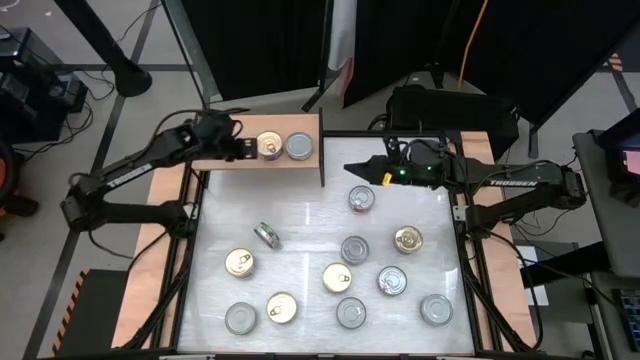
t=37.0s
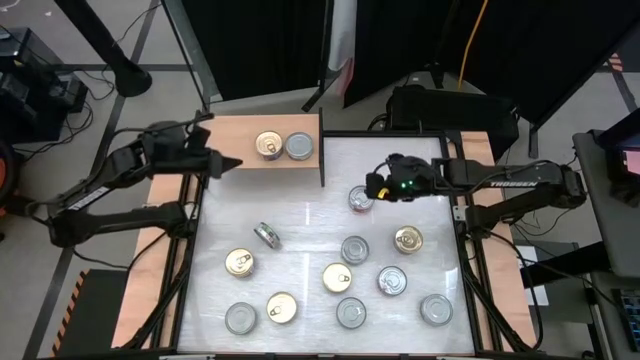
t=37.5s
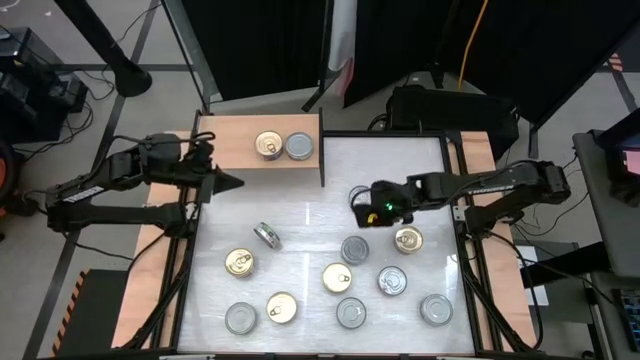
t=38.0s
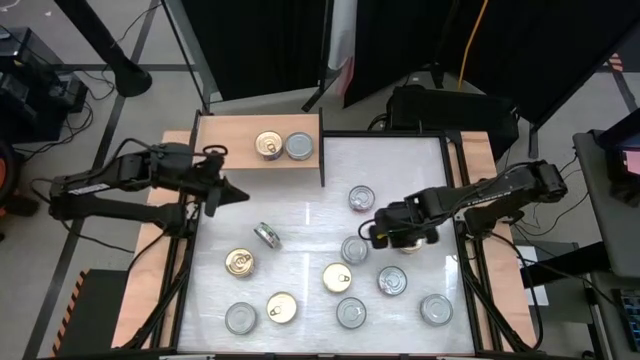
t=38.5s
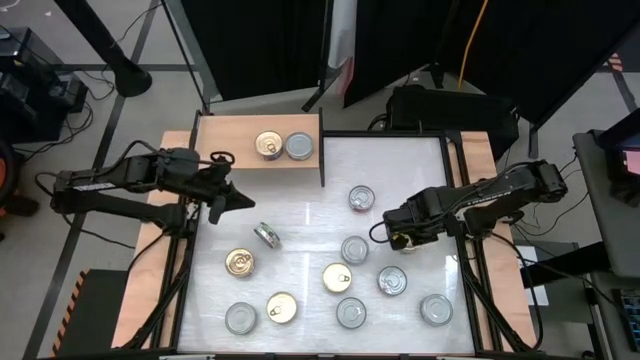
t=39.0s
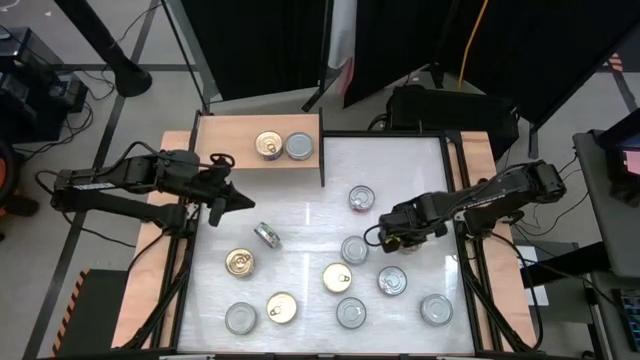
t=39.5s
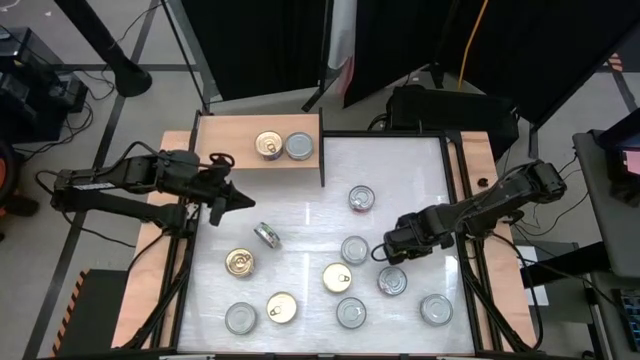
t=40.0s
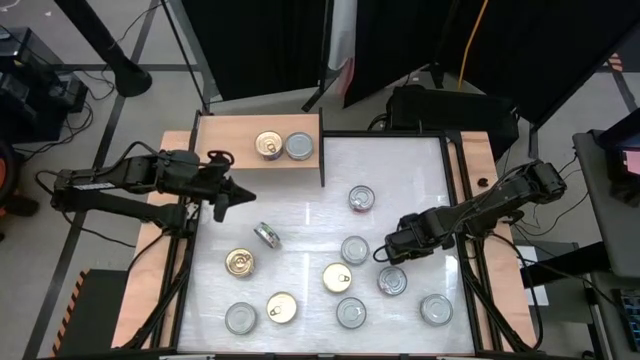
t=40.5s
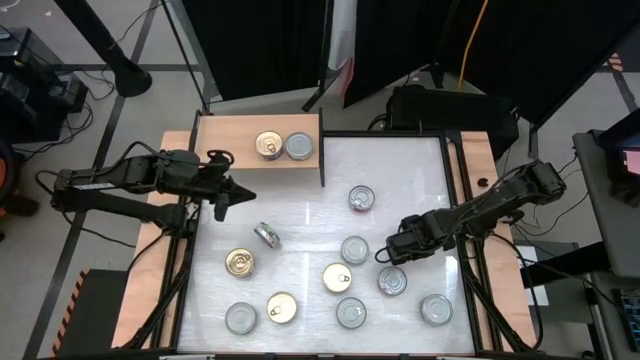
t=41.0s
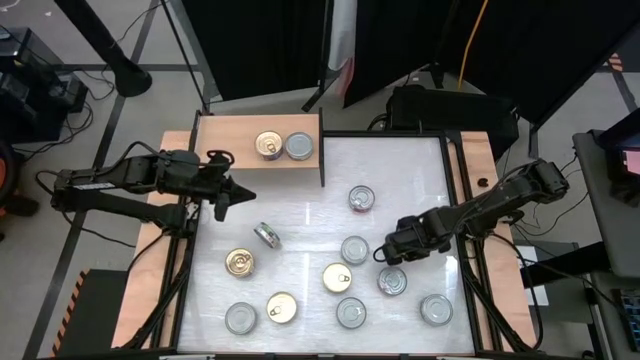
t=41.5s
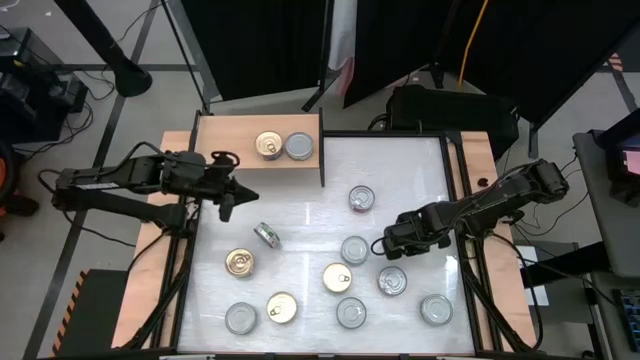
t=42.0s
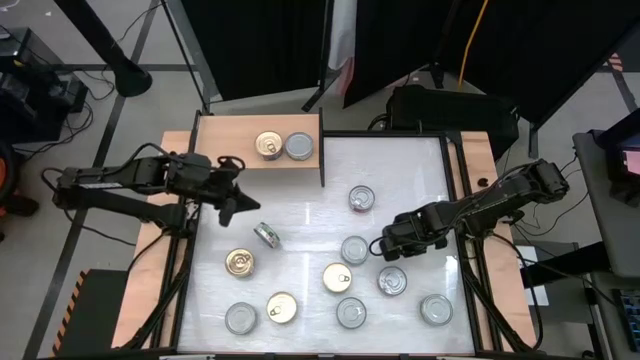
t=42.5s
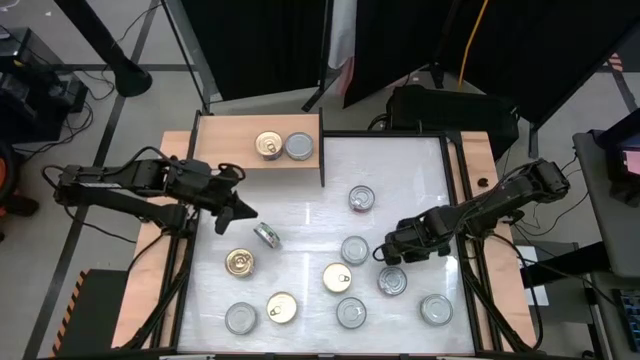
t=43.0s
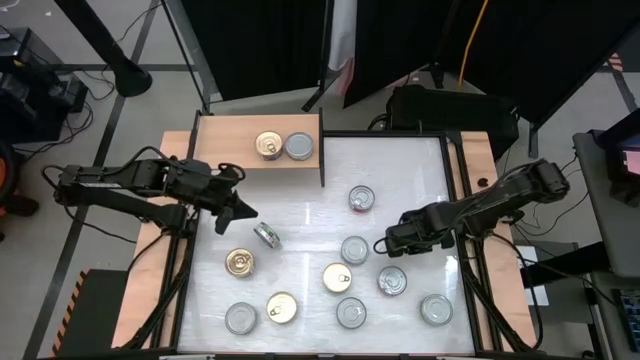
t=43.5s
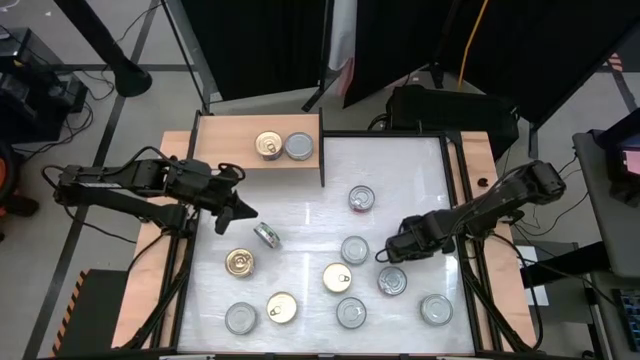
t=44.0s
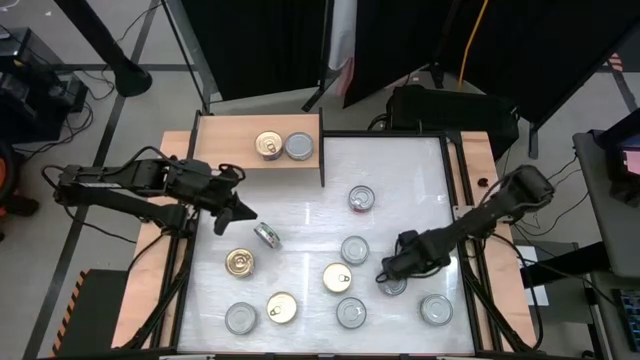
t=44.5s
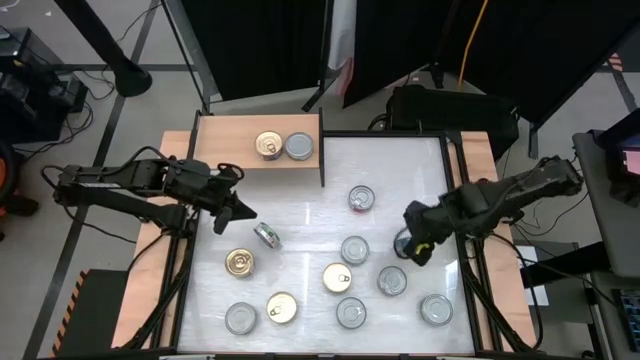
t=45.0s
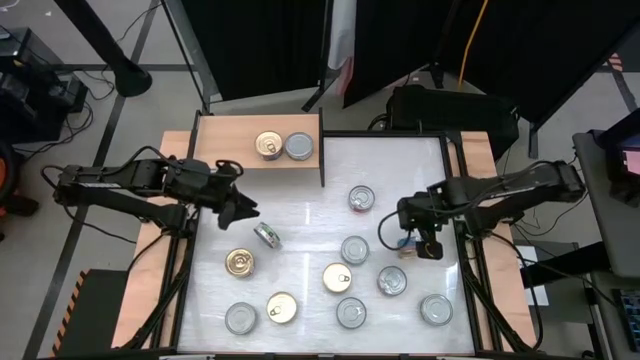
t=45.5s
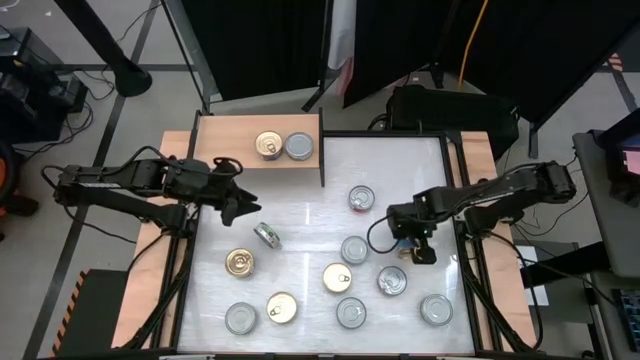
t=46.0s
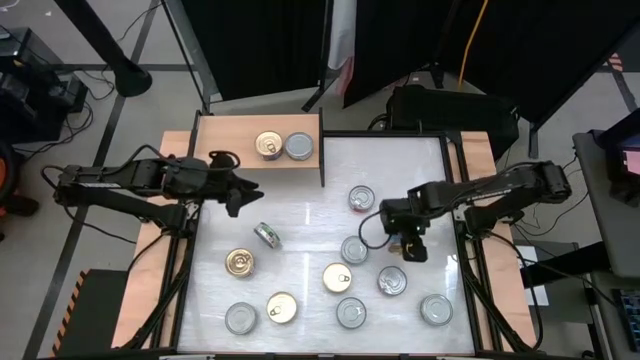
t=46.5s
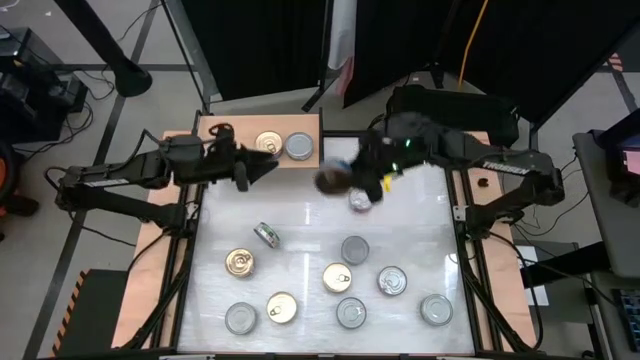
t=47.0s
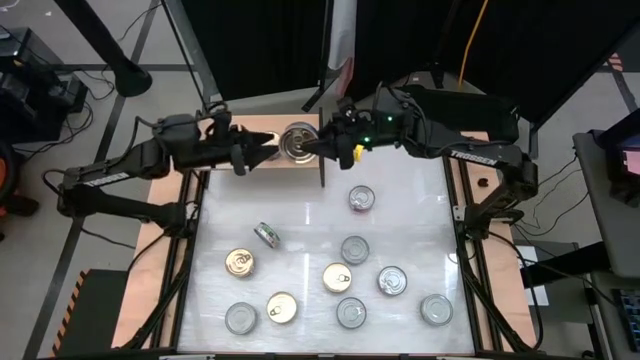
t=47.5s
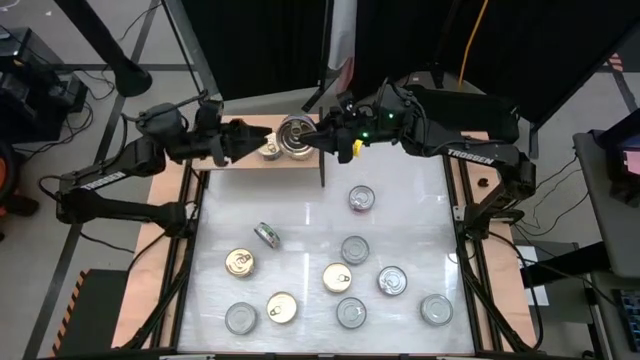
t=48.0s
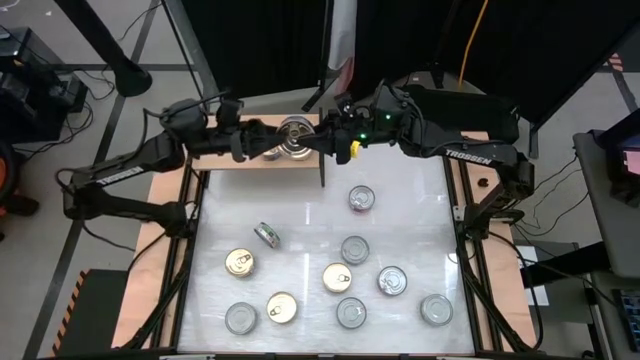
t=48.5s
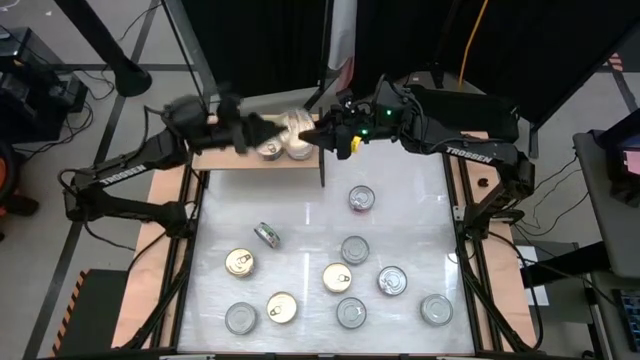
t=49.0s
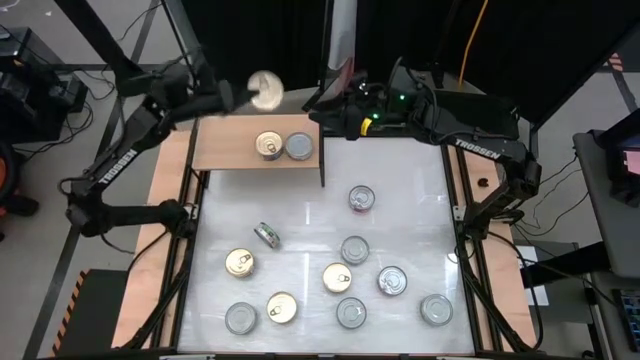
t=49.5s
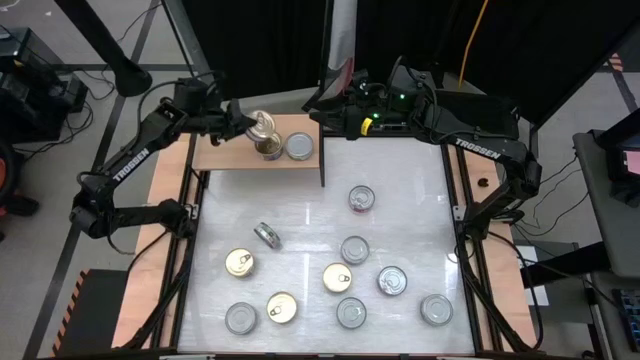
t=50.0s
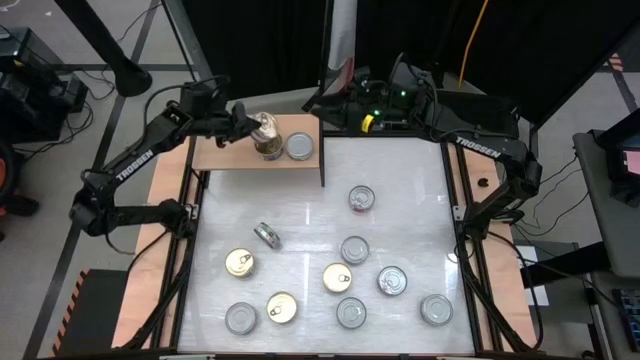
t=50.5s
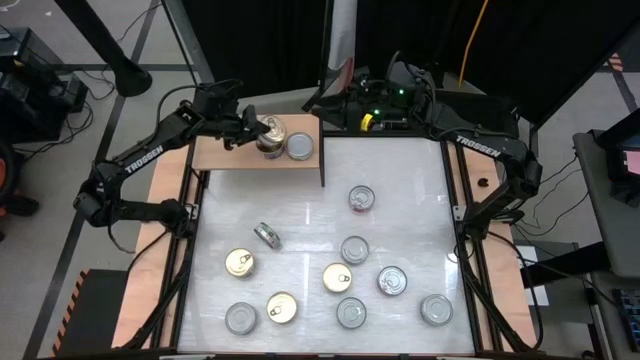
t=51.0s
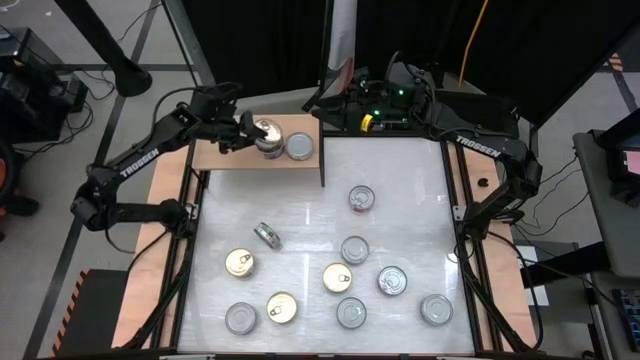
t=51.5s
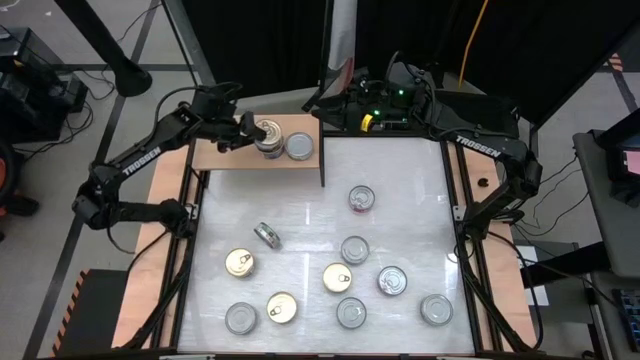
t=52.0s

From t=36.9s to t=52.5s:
Task: Stack canned seafood by type on shelf
Stack the blue pink tuna can on top of the blue pink tuna can on the shelf

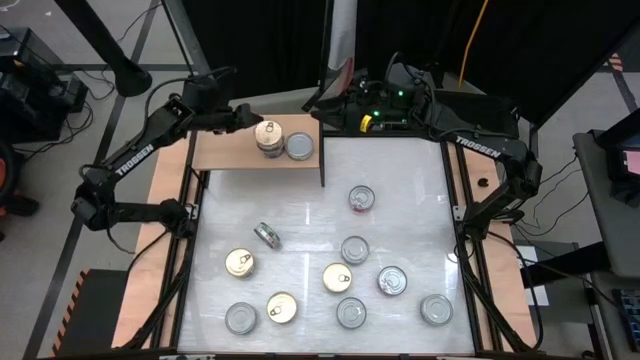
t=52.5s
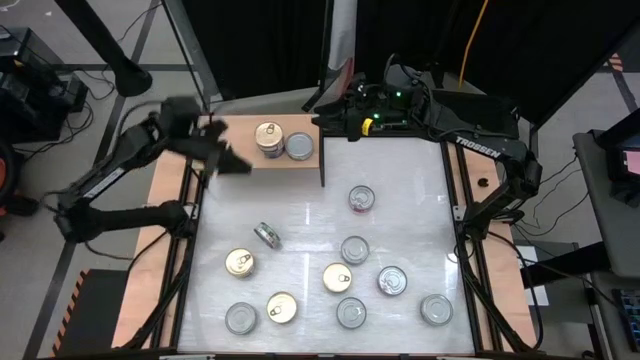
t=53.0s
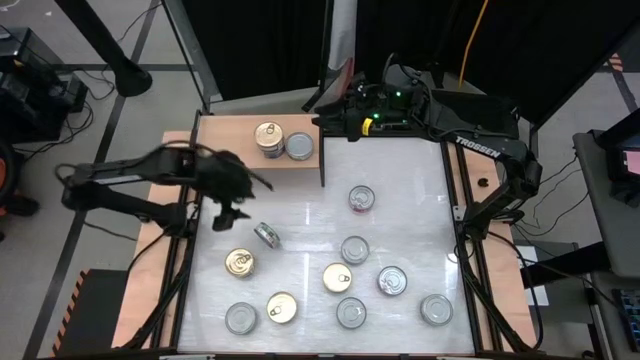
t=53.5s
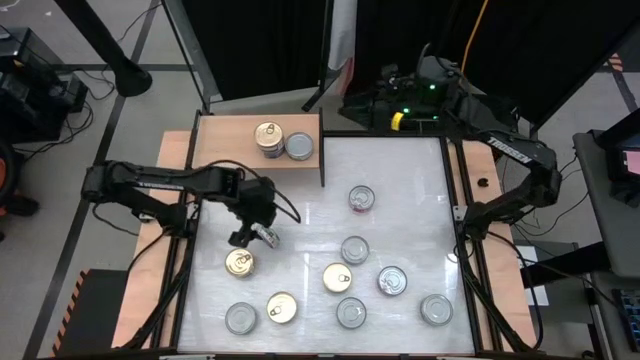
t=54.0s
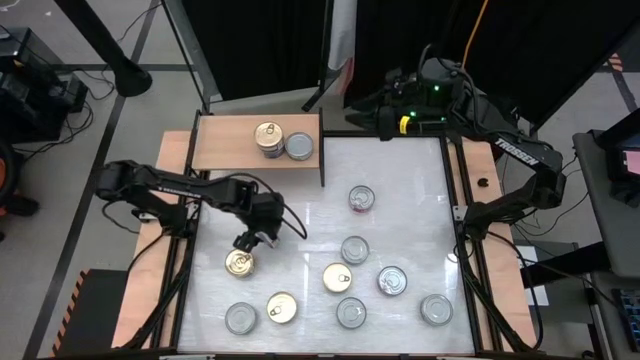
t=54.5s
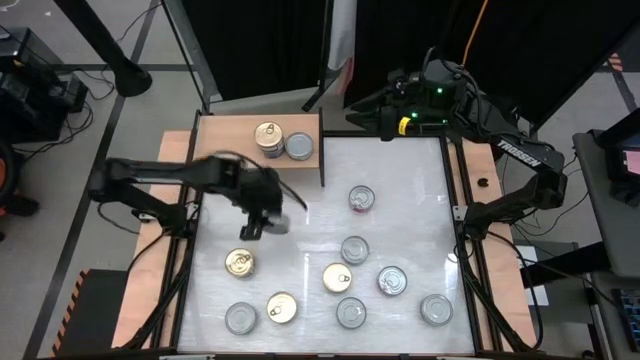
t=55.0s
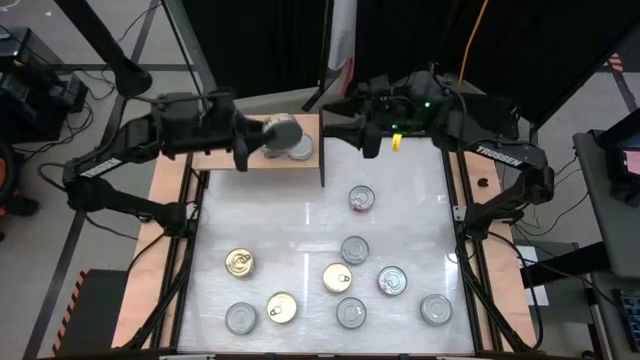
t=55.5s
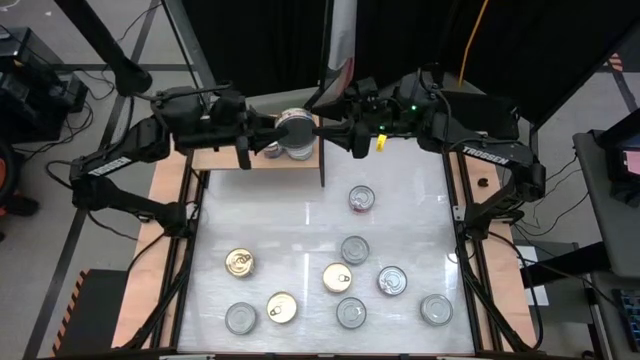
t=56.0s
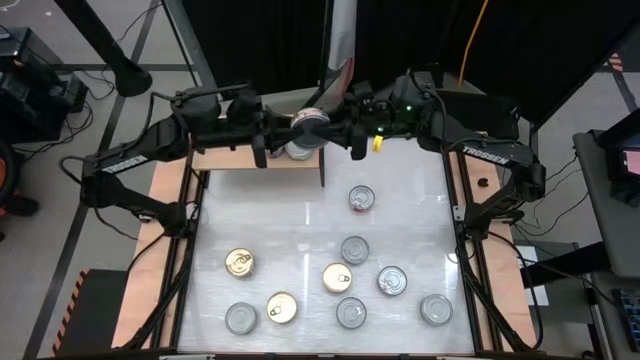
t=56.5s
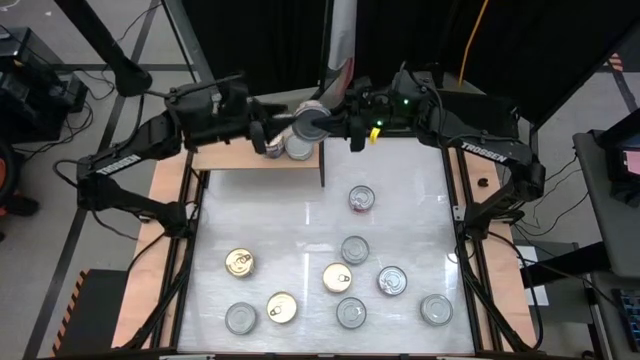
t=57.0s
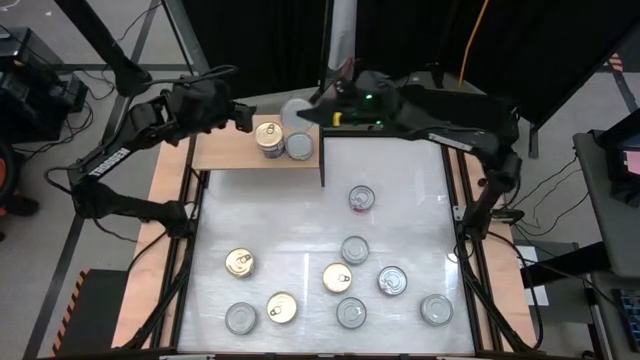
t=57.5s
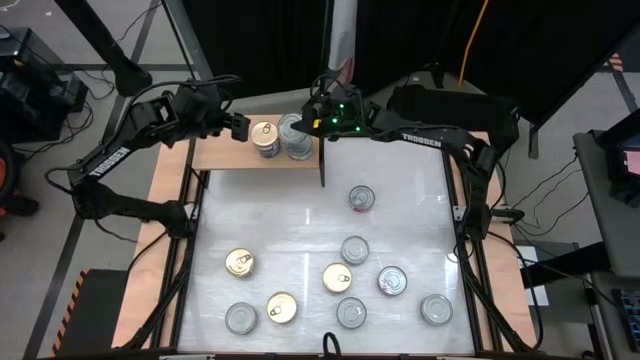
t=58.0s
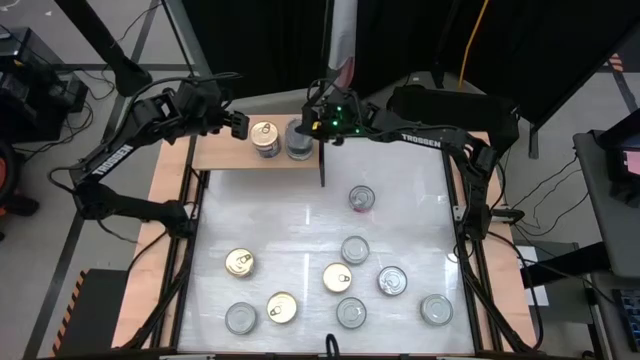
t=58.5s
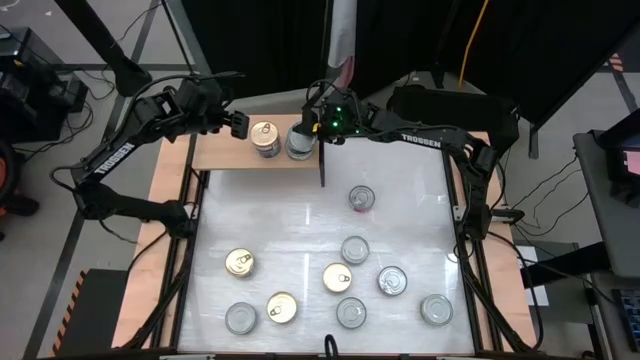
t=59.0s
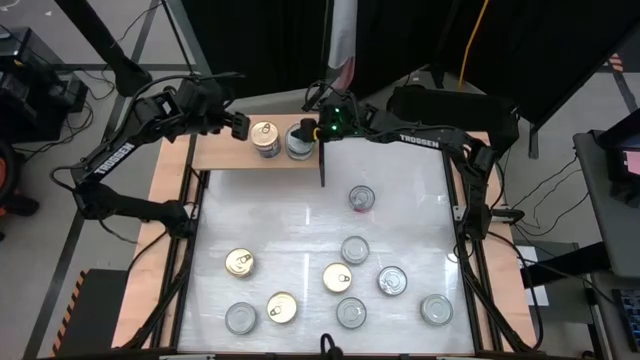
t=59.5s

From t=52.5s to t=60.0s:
Stack the green white tuna can on top of the green white tuna can on the shelf
